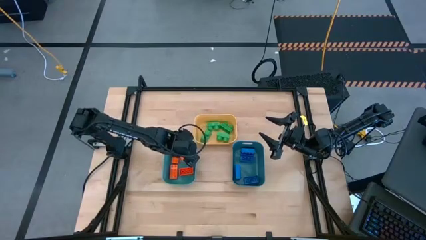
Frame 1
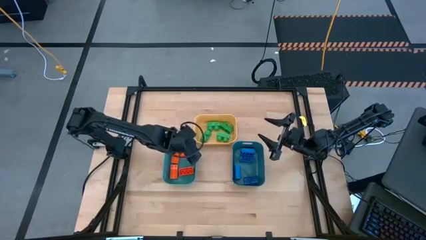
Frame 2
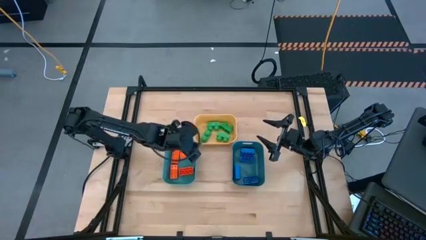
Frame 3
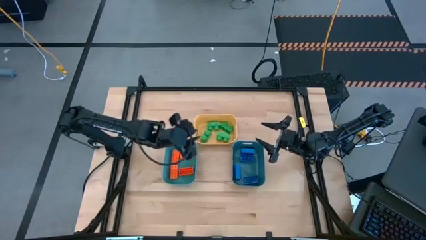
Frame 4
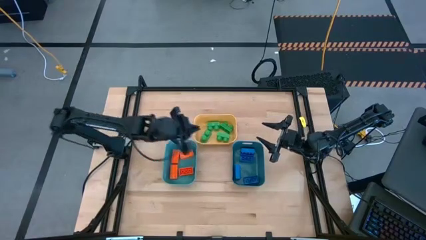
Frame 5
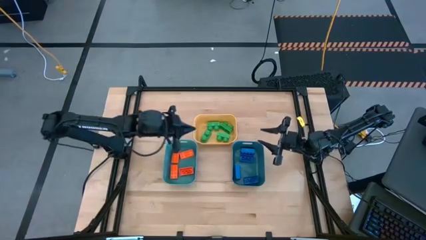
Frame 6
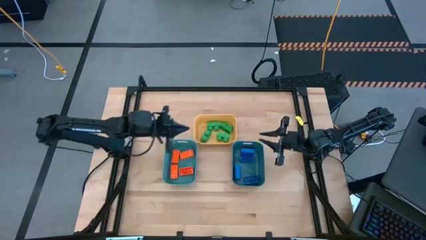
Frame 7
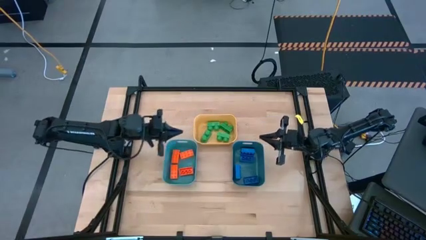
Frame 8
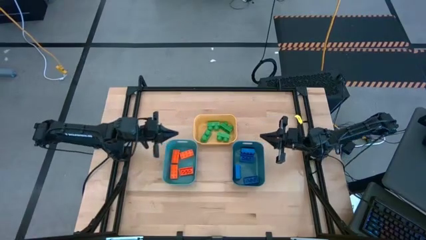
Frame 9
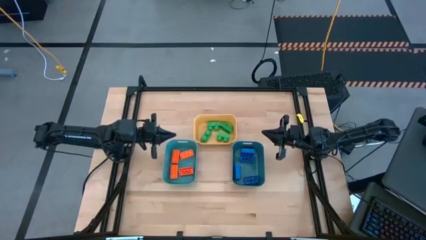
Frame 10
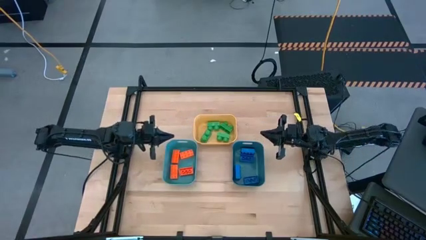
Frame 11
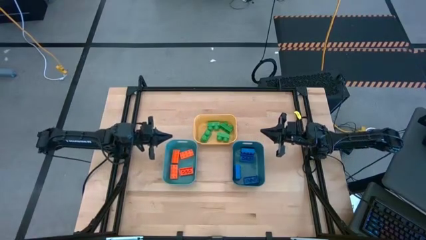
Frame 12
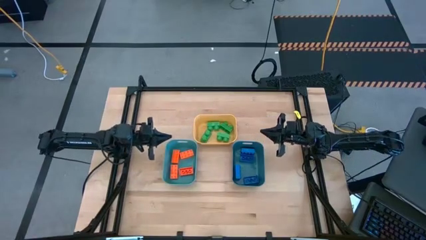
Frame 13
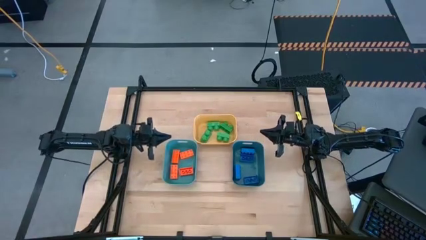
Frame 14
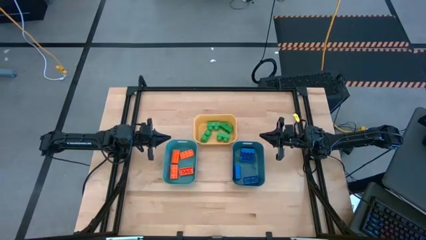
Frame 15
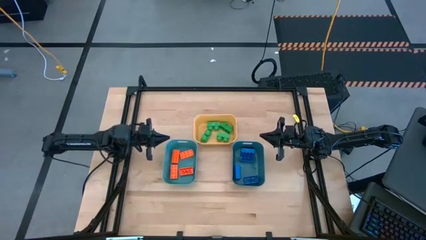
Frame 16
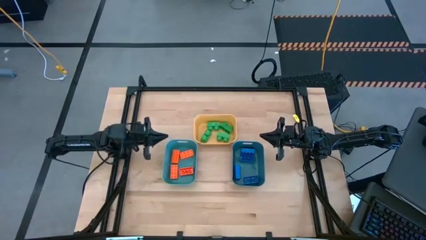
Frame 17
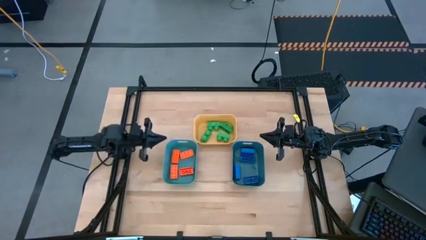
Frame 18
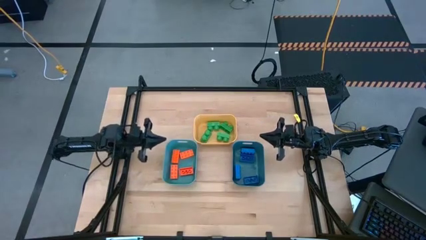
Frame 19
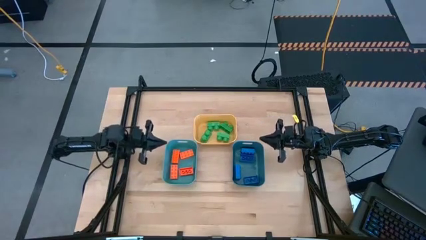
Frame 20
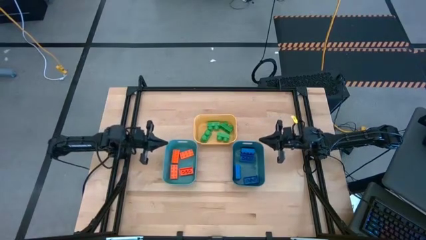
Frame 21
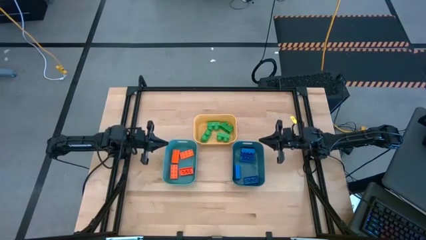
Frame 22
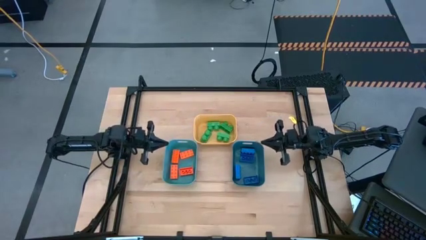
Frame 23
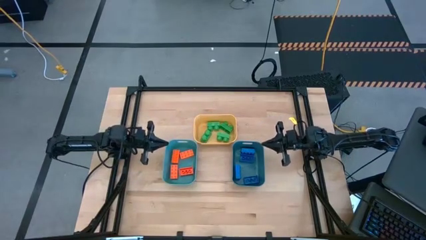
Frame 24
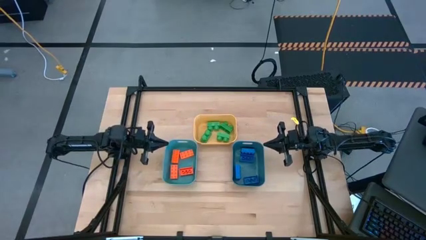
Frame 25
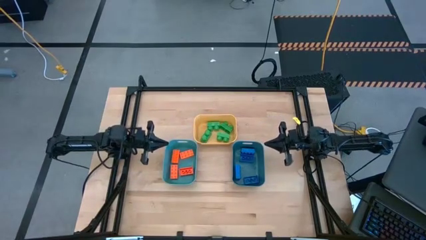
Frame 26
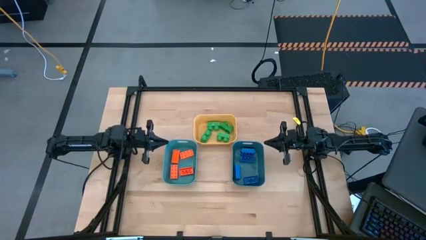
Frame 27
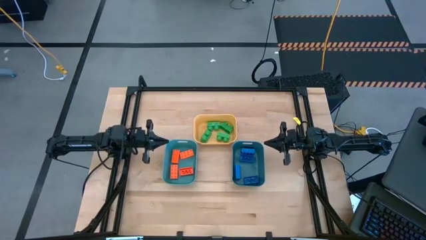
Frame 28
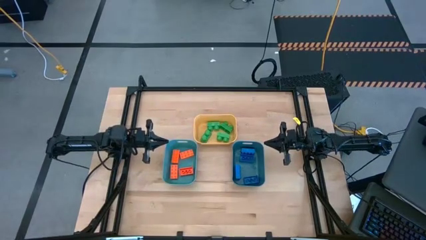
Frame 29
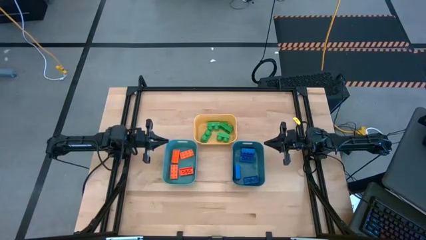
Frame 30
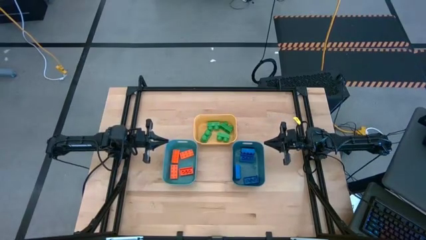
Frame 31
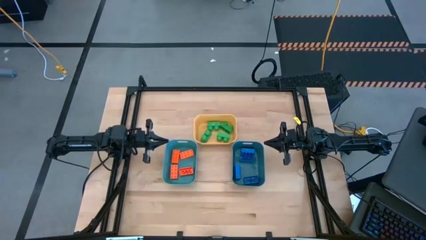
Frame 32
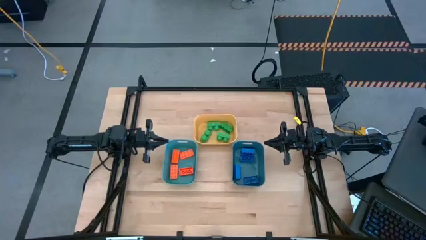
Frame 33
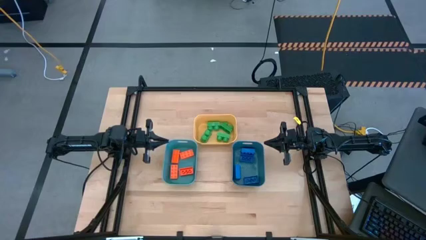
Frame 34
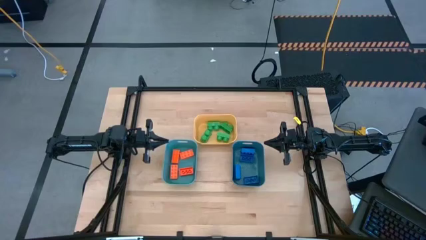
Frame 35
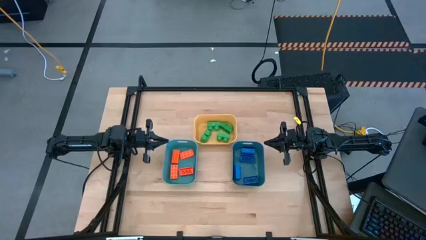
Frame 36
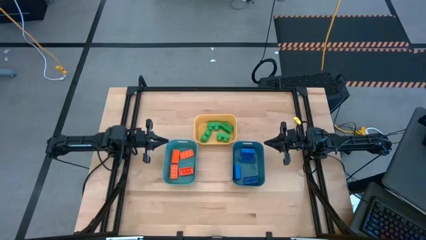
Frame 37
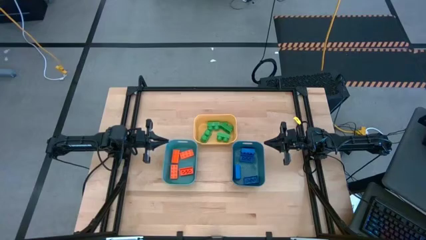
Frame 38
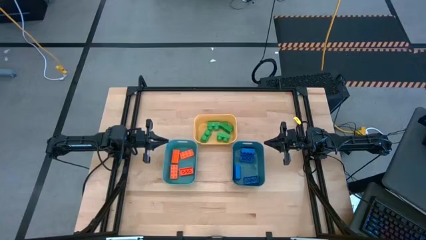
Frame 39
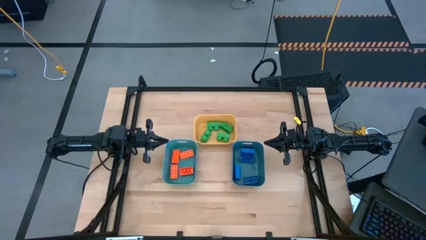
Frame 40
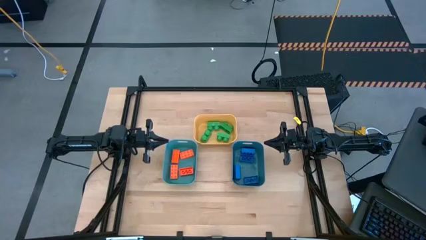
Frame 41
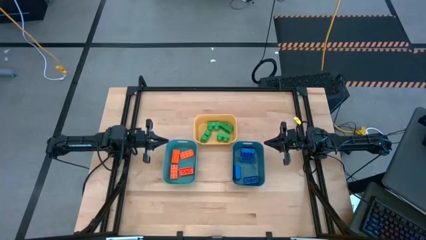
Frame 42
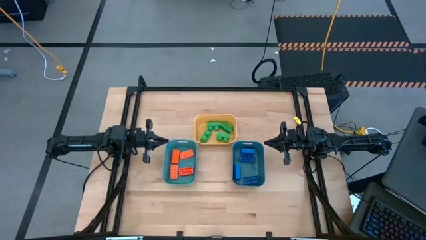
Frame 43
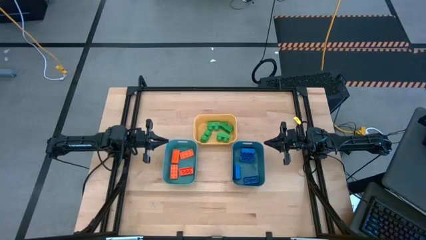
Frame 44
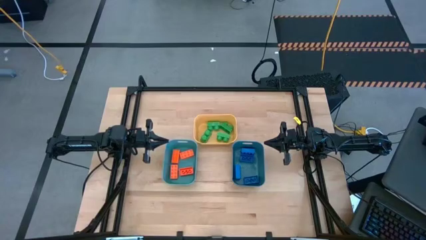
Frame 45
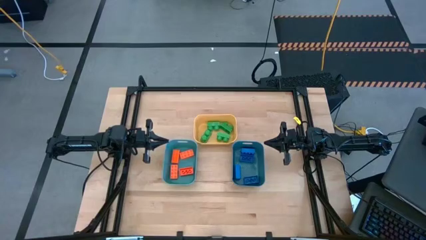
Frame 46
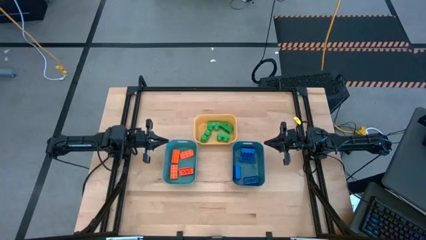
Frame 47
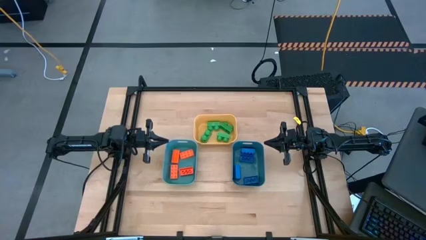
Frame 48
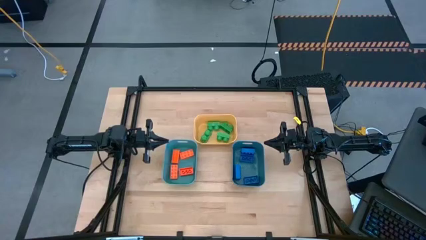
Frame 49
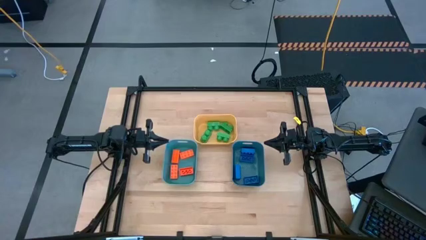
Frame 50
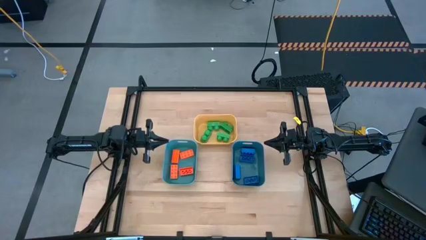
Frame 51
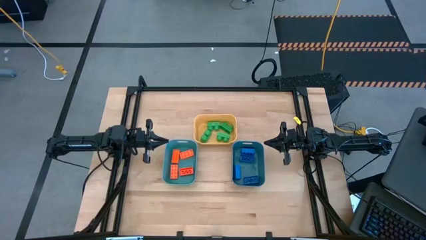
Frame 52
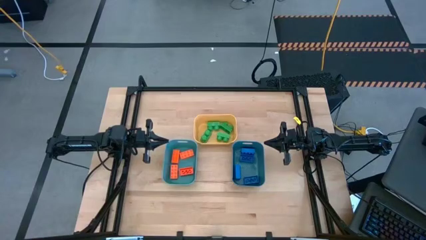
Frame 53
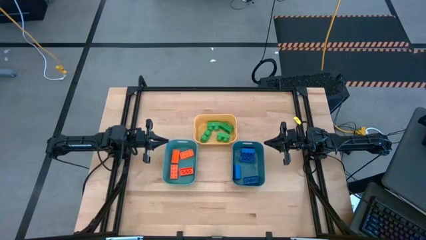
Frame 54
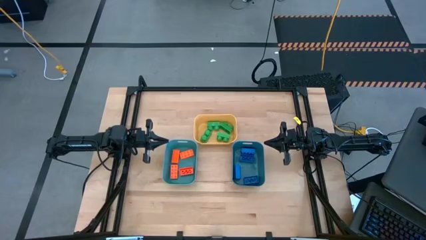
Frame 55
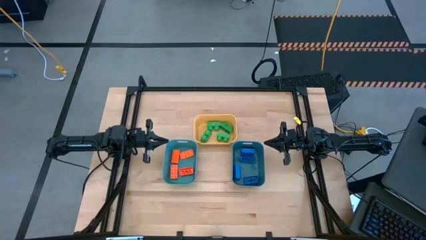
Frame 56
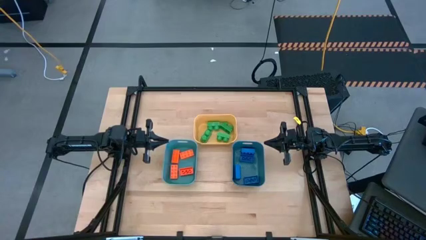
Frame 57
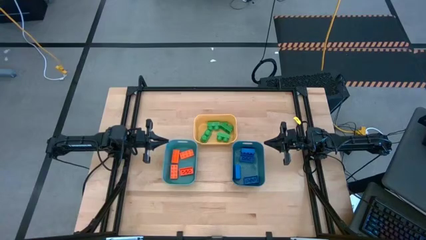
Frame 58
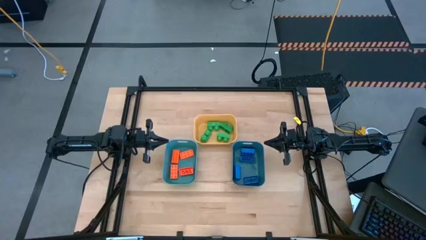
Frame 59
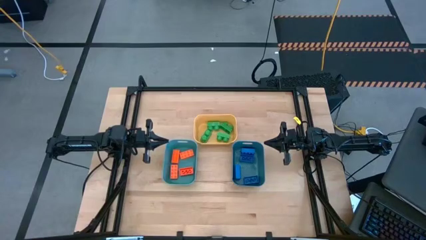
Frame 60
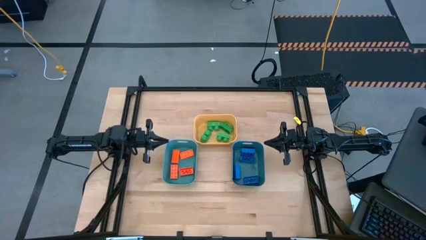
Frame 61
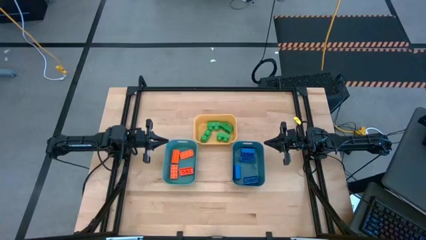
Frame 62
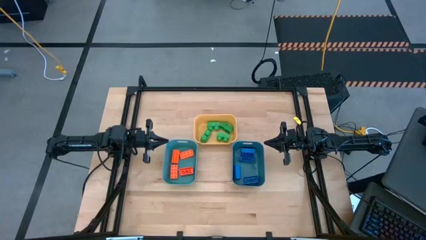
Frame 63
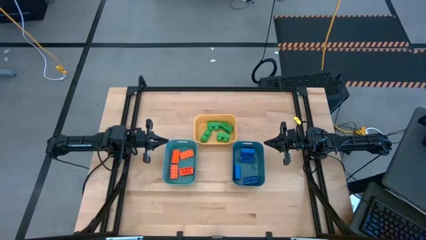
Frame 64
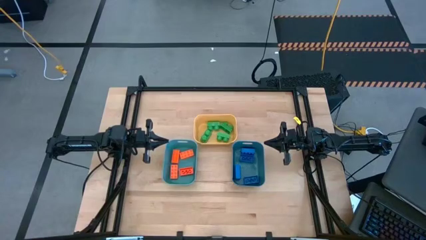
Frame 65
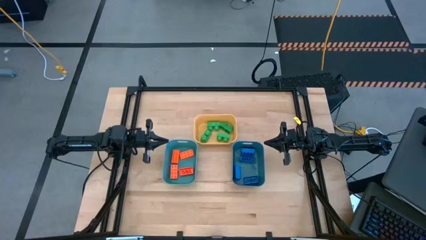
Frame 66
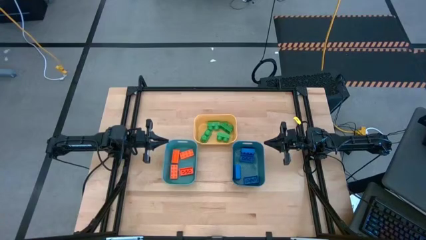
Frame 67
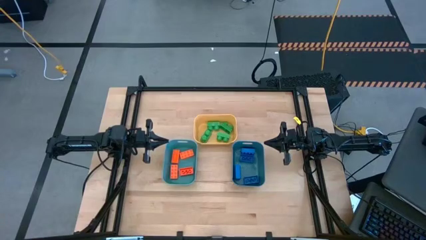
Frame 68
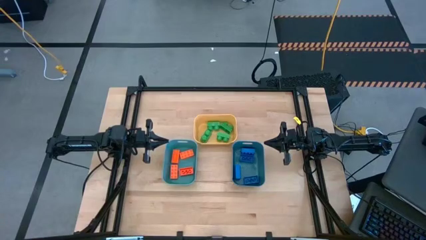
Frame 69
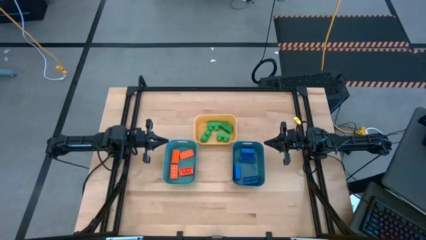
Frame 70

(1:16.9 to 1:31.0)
Task: Sort & place blocks by color
Return to Home Position
